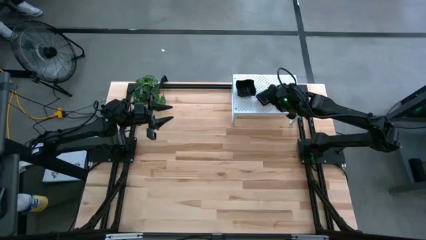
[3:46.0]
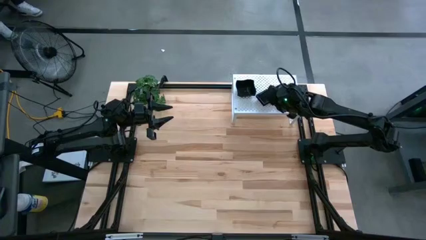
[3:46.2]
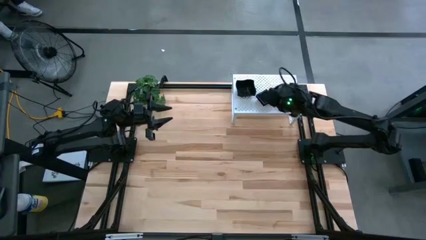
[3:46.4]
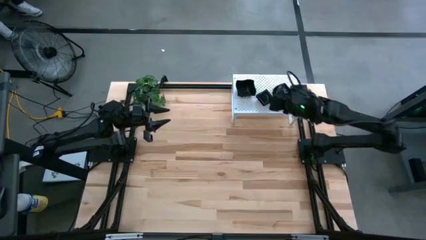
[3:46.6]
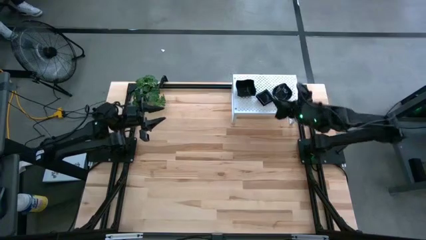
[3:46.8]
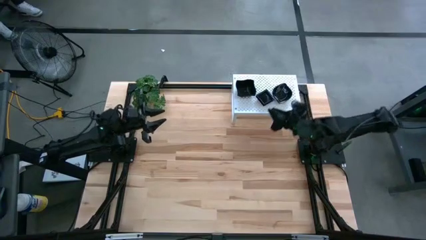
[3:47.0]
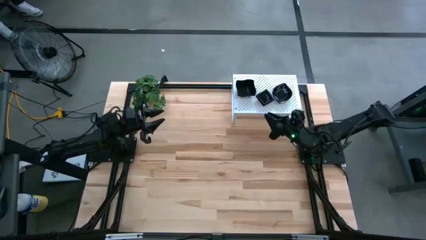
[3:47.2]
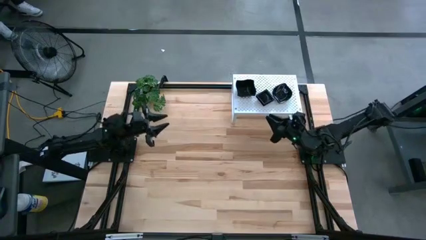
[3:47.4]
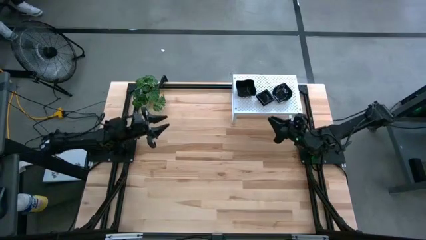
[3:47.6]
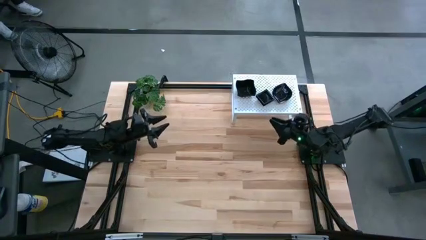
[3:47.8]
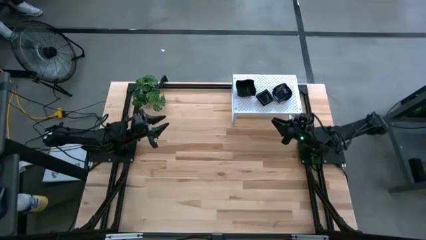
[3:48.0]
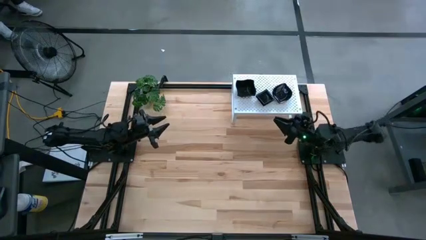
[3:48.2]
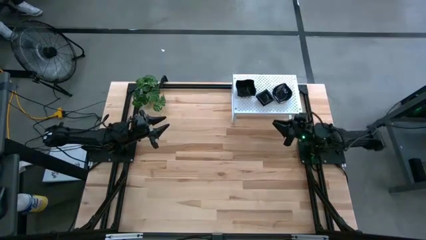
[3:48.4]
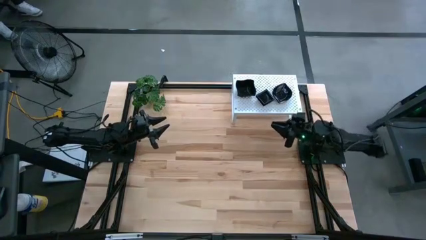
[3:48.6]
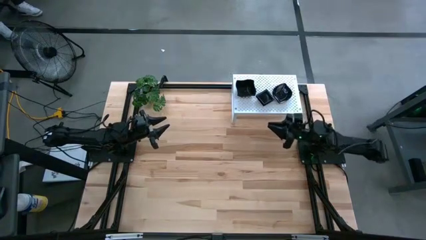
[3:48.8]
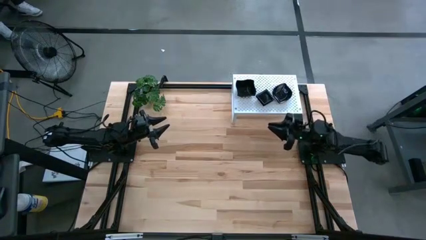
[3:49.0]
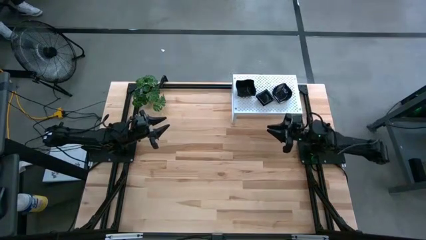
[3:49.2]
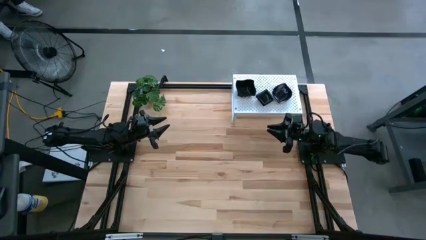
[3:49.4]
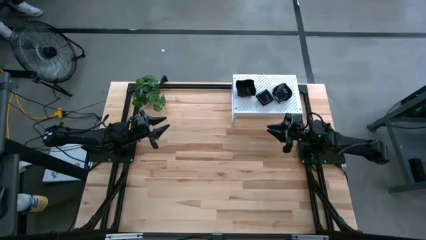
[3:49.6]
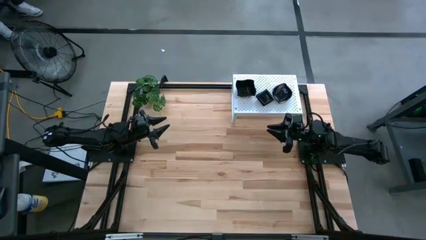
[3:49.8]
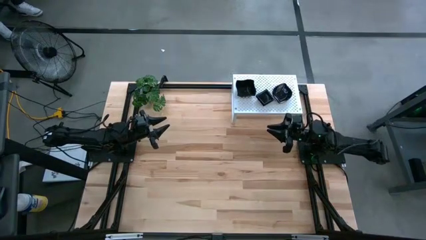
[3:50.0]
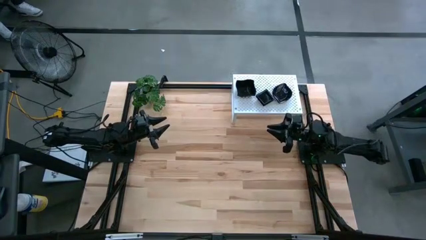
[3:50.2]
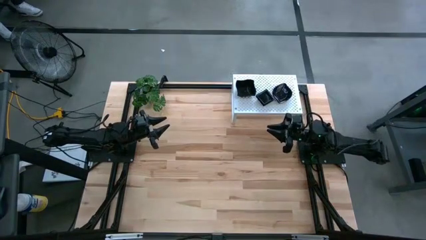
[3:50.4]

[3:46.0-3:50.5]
Task: Pick & Place Mini shaped plates
Return to Home Position

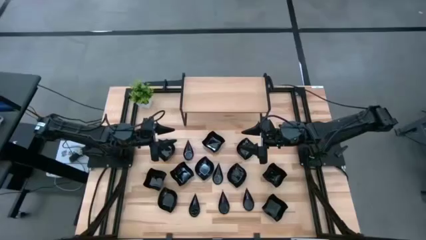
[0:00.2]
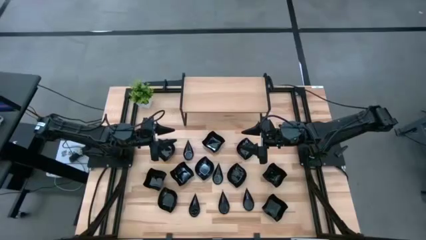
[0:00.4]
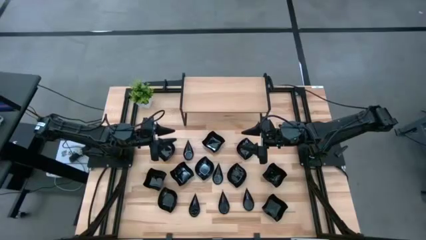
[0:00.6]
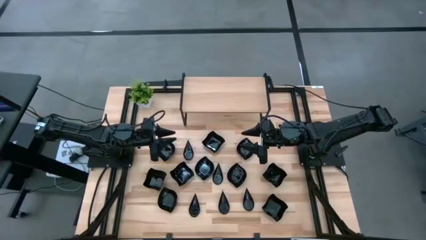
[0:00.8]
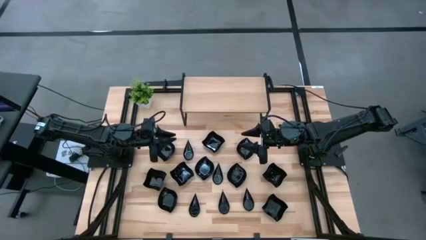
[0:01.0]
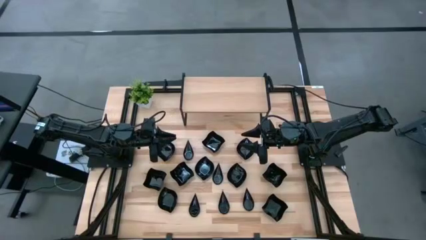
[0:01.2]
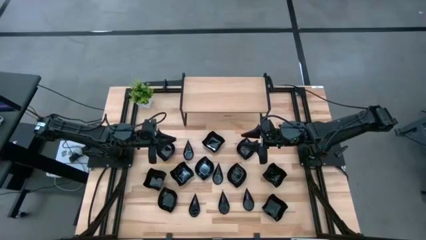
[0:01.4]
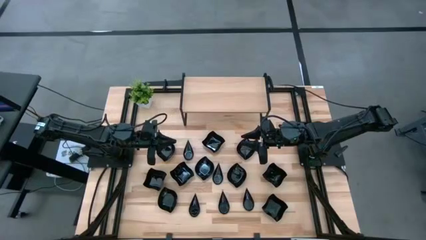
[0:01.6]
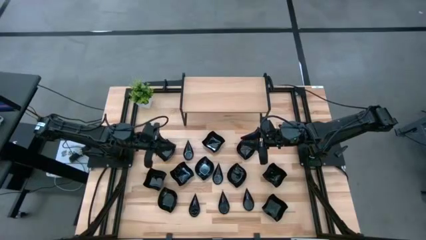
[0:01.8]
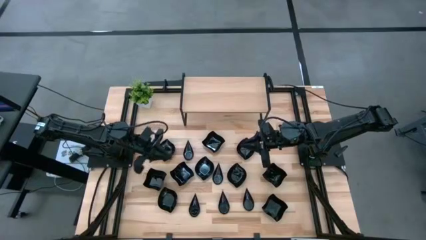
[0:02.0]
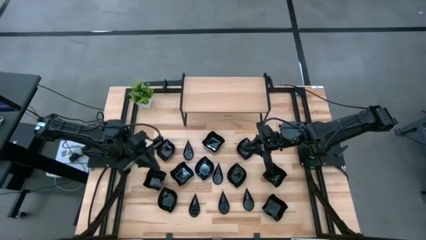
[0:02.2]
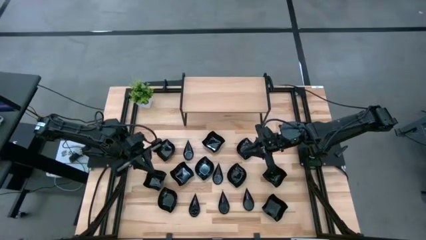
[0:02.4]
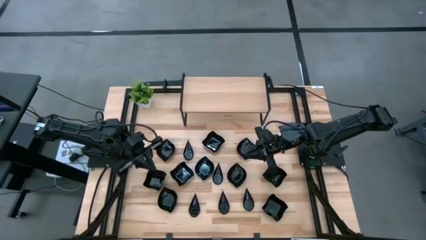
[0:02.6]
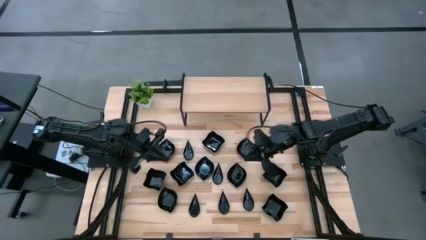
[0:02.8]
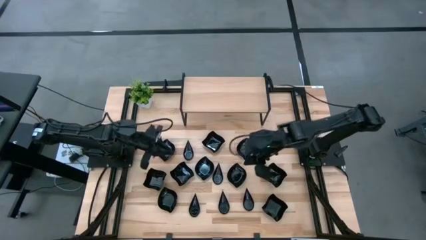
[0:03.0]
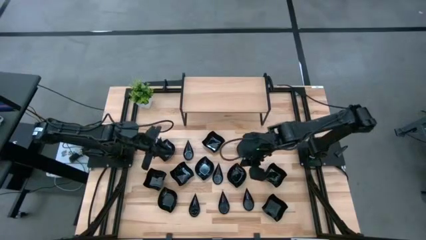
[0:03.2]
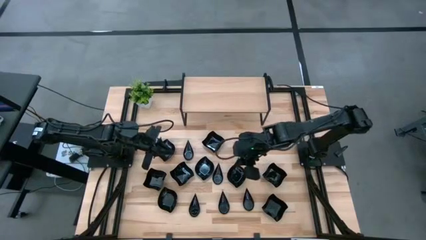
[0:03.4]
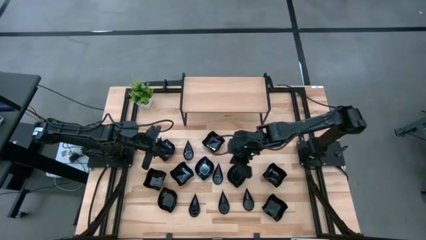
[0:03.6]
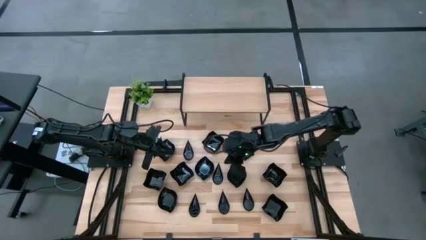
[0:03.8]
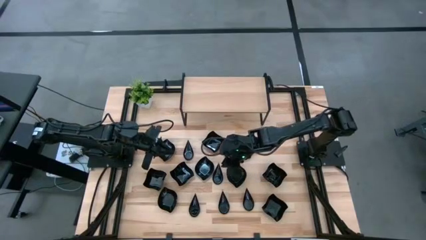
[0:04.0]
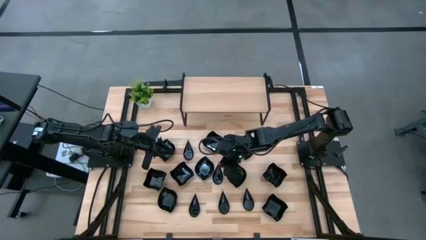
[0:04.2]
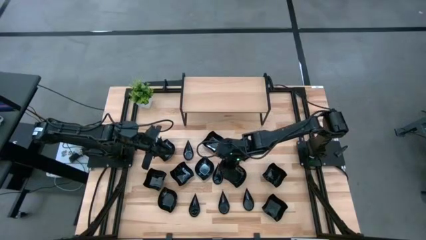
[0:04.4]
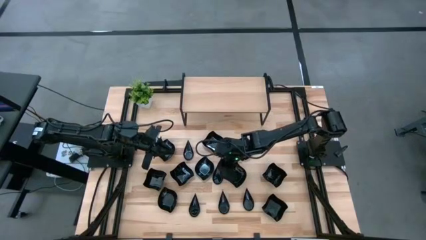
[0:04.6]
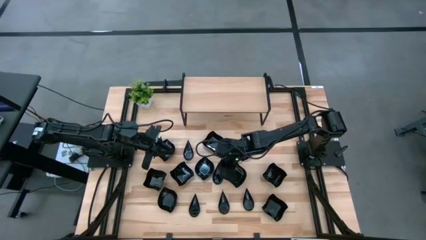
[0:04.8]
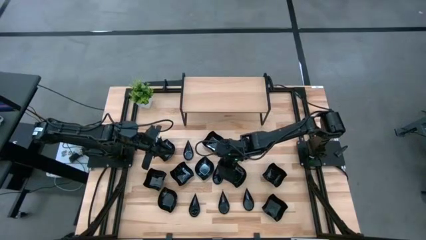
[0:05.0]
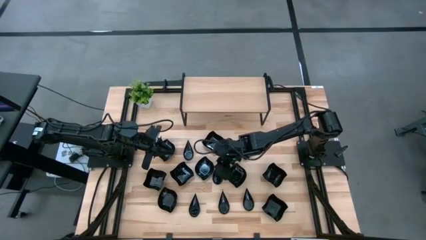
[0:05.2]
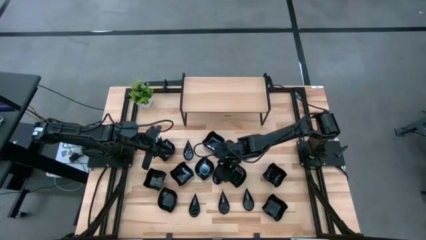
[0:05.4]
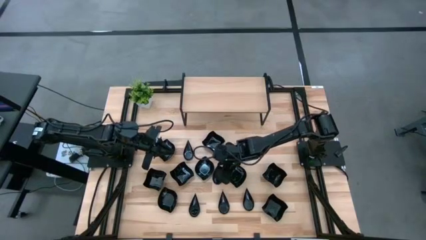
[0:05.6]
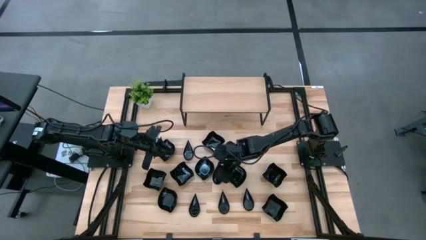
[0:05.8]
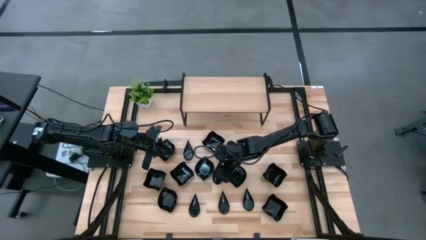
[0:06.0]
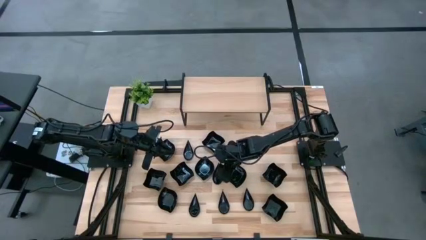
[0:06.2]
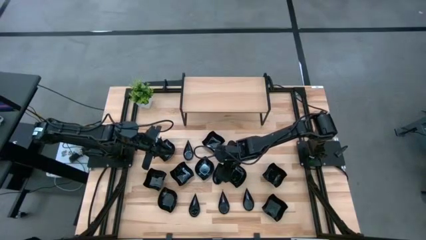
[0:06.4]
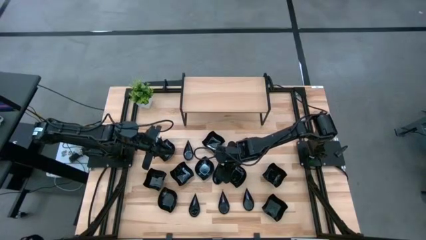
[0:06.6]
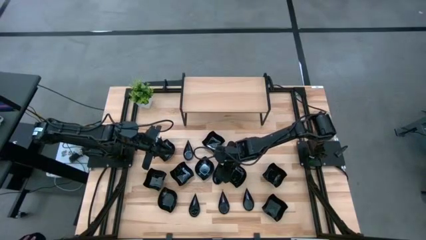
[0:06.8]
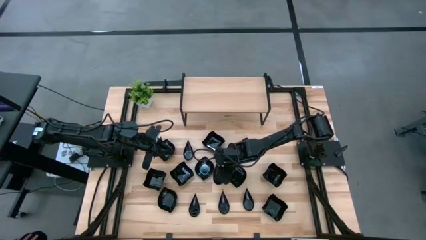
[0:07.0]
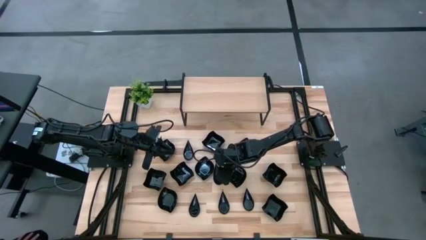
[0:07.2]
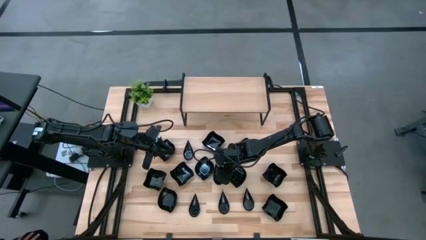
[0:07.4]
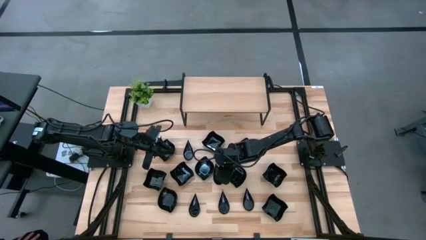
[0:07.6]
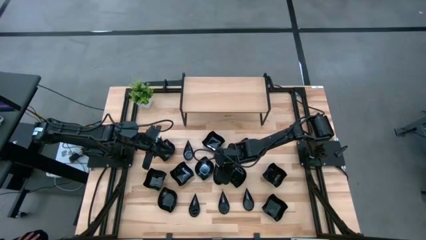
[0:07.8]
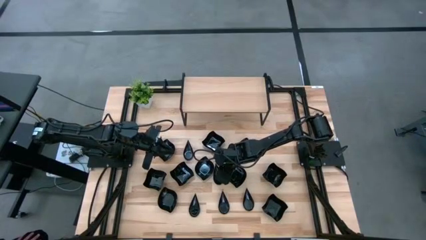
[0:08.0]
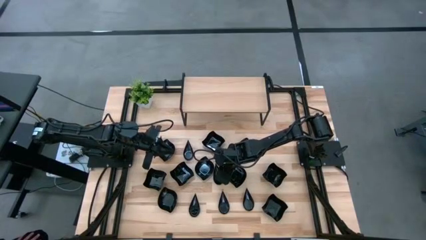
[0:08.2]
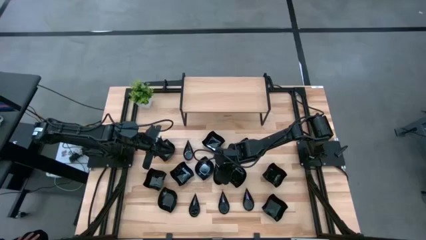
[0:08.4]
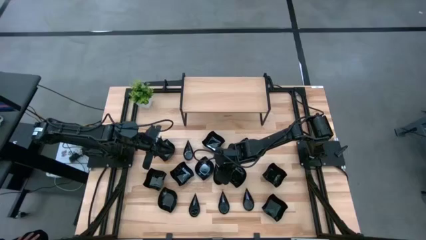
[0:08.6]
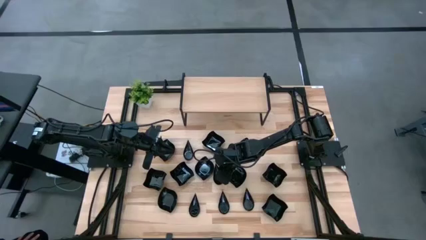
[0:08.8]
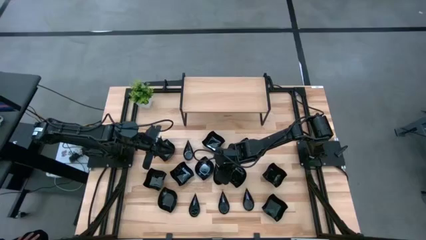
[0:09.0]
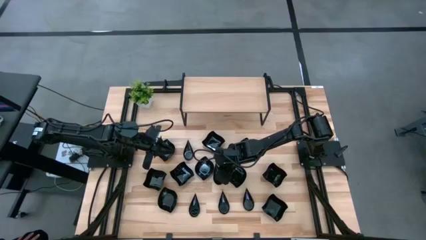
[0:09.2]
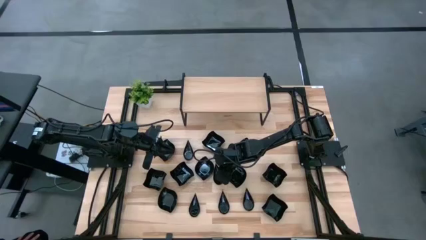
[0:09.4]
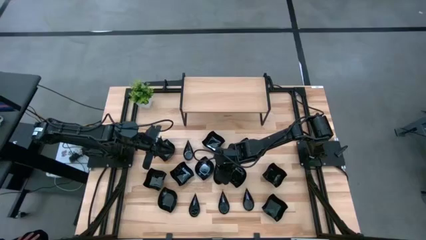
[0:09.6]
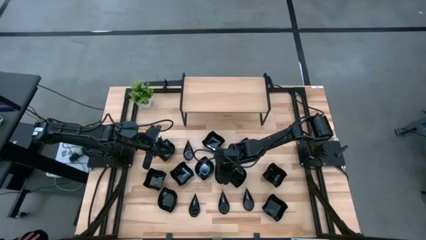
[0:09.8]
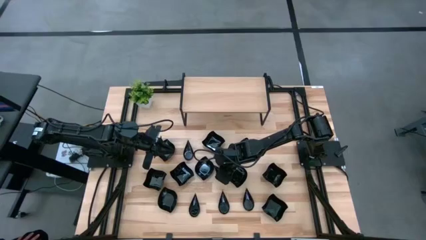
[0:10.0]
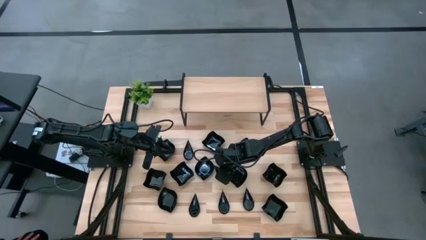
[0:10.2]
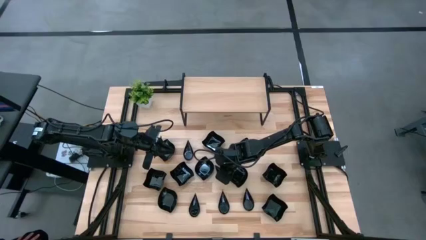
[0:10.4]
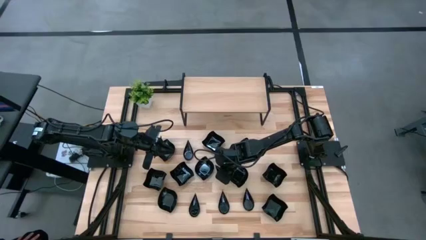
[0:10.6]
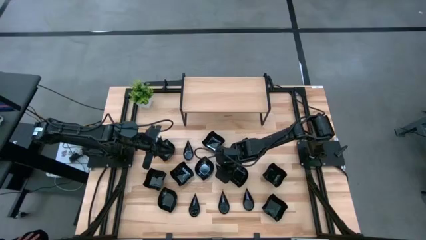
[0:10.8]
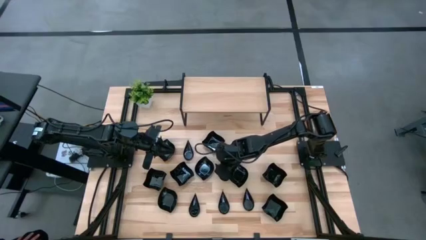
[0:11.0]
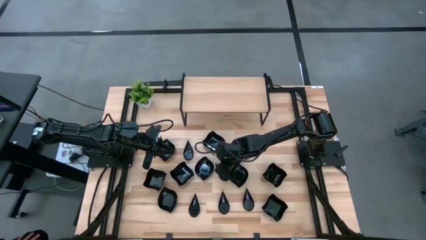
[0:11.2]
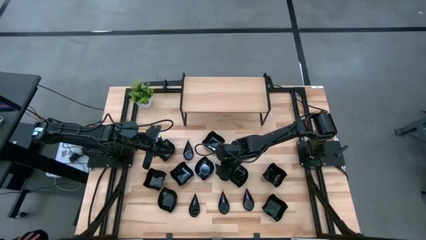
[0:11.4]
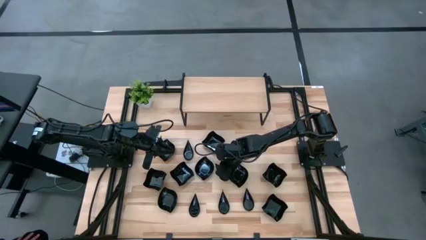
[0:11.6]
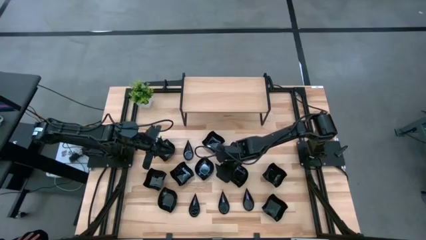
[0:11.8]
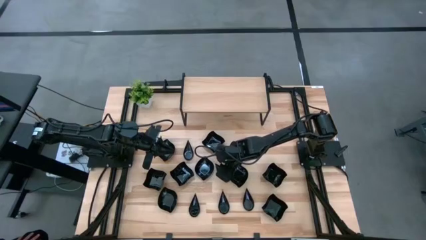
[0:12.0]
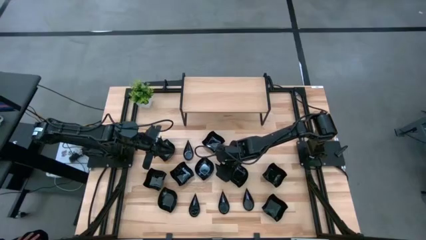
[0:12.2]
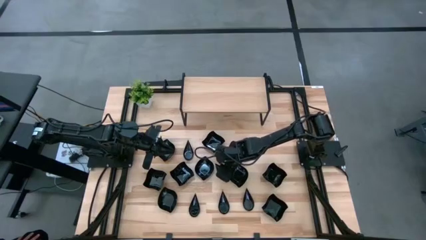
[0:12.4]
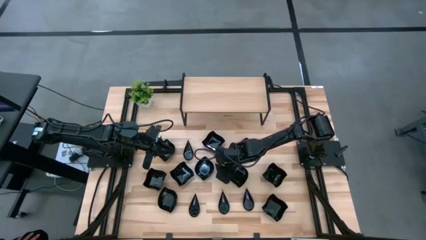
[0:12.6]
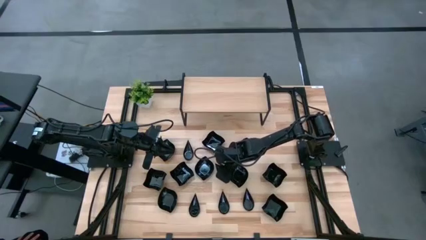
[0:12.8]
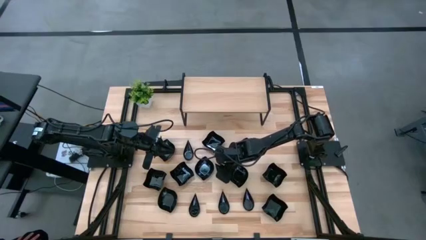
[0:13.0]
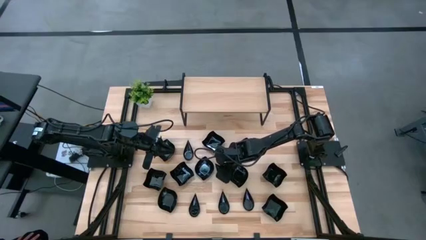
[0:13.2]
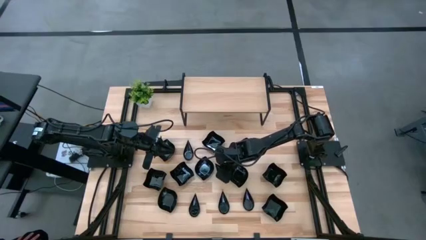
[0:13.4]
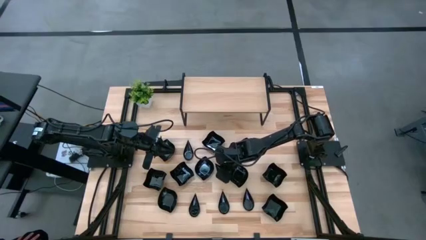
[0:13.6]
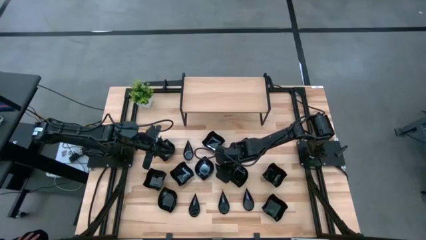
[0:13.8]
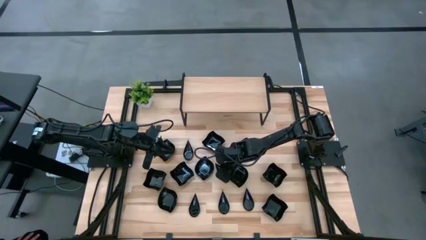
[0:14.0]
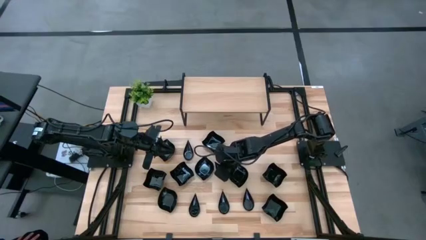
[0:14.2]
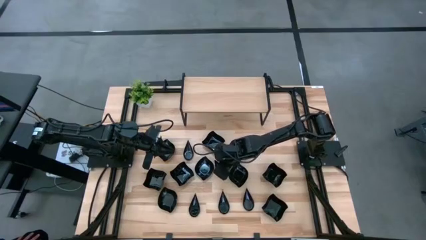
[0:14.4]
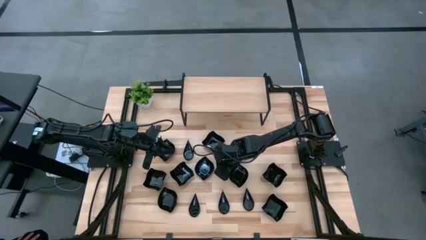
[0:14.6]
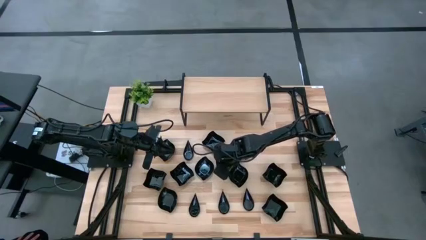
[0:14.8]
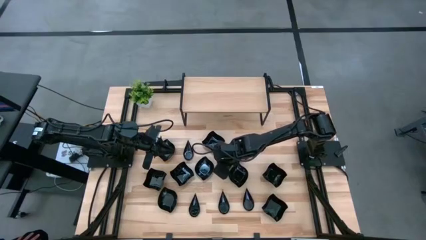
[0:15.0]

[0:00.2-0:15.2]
Task: Pick & Place Mini shaped plates
Put the black drop shaped plate on the shelf
